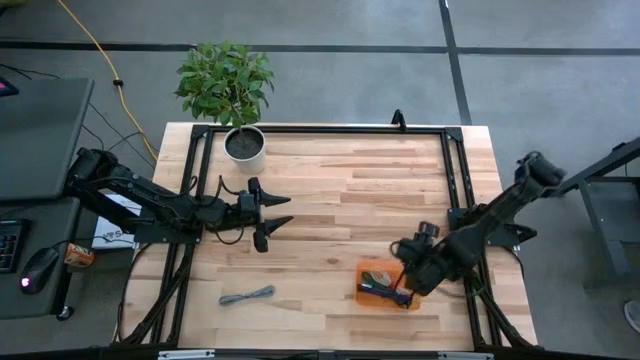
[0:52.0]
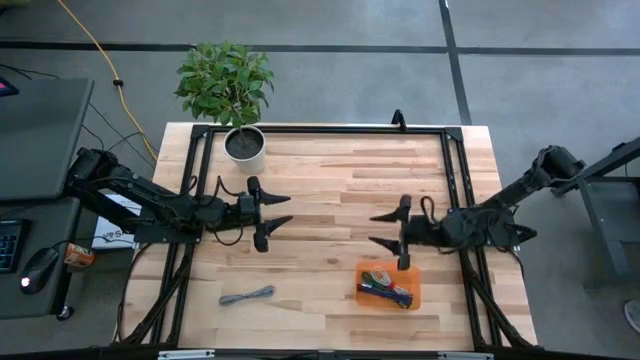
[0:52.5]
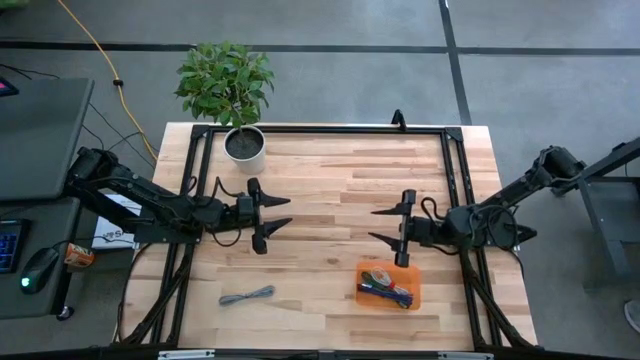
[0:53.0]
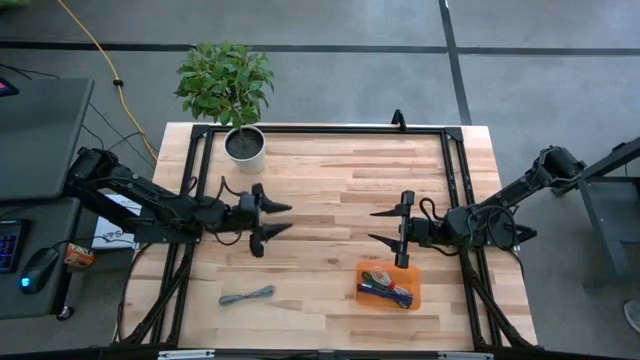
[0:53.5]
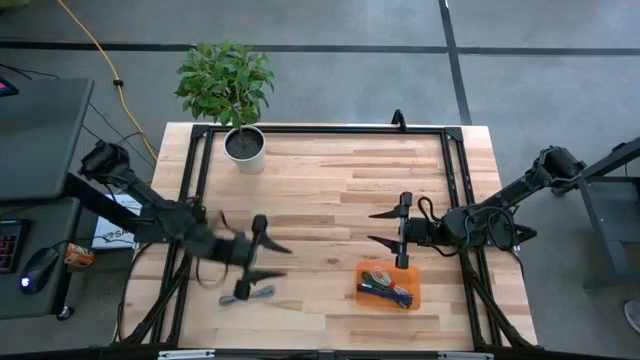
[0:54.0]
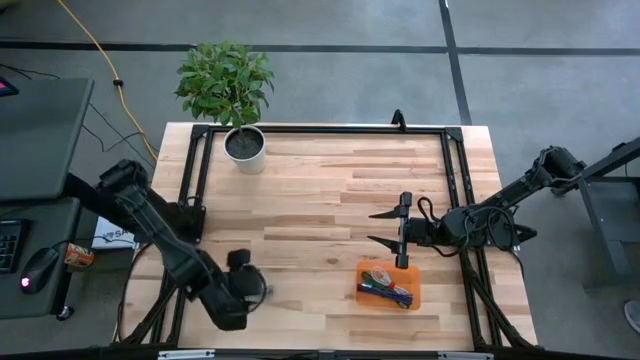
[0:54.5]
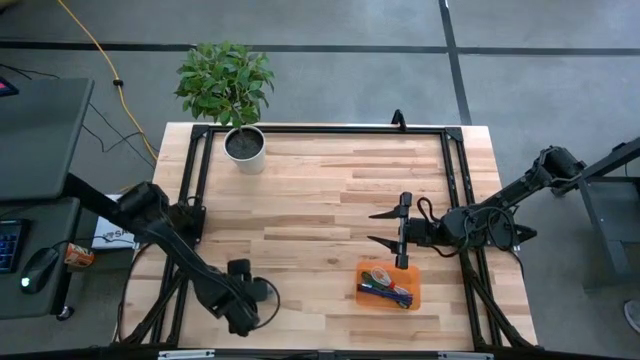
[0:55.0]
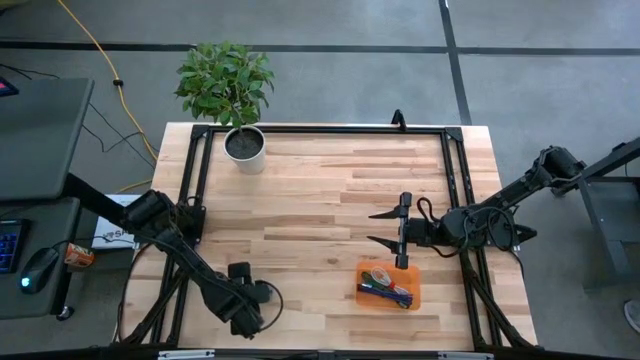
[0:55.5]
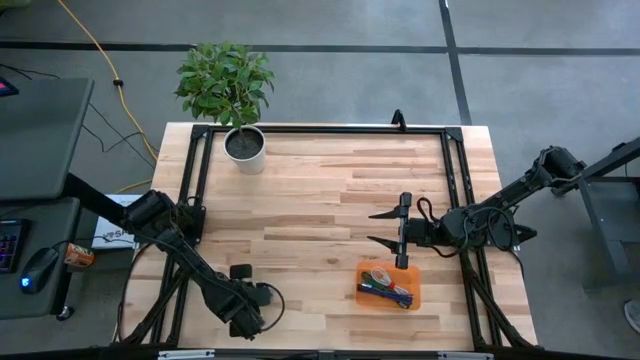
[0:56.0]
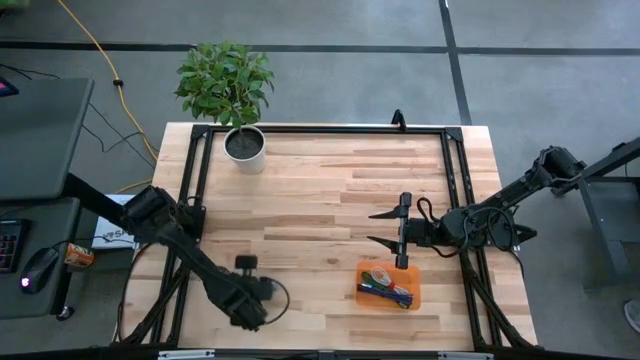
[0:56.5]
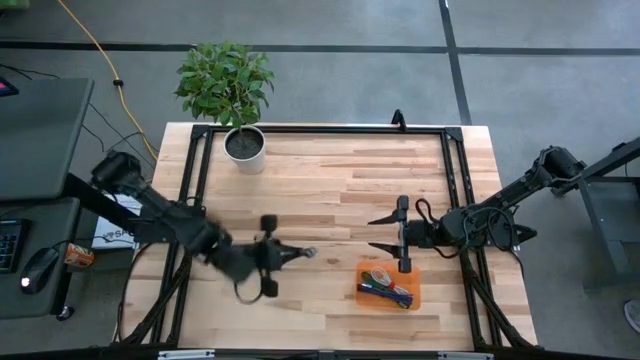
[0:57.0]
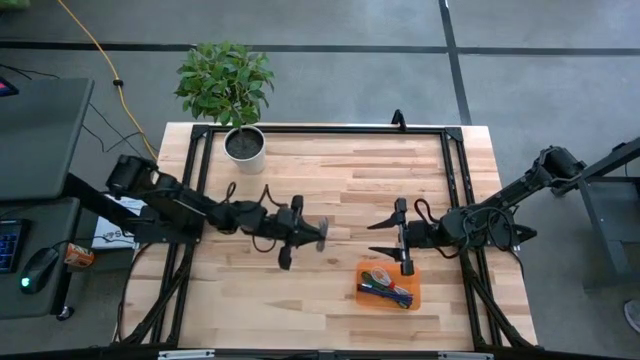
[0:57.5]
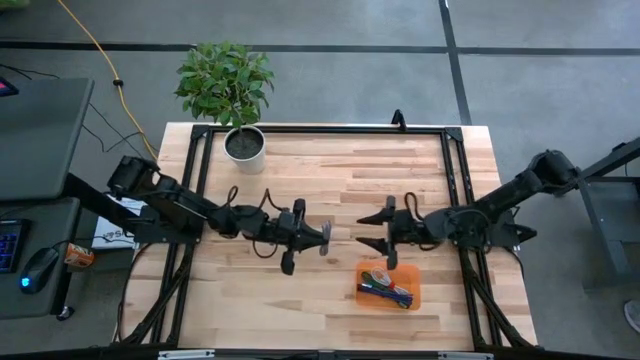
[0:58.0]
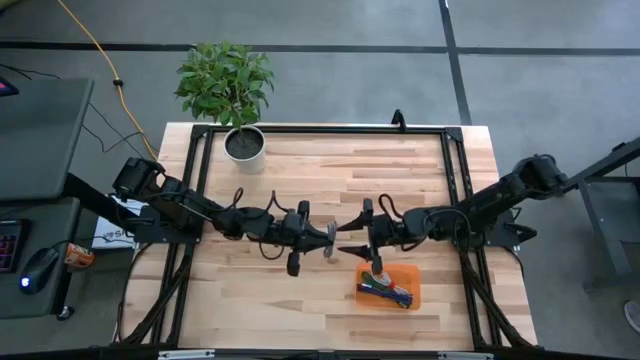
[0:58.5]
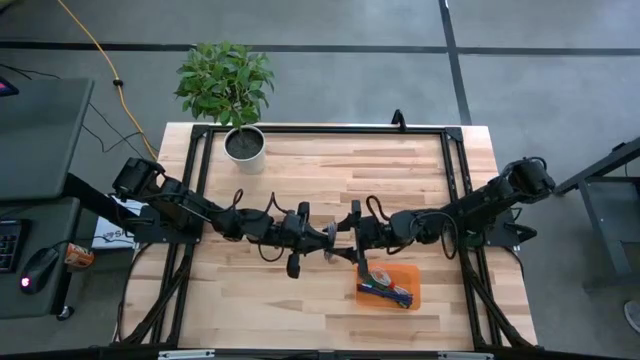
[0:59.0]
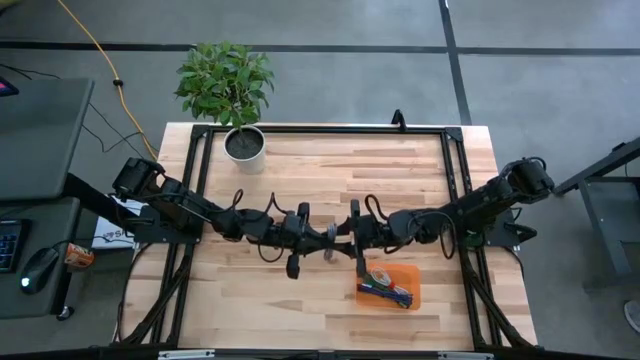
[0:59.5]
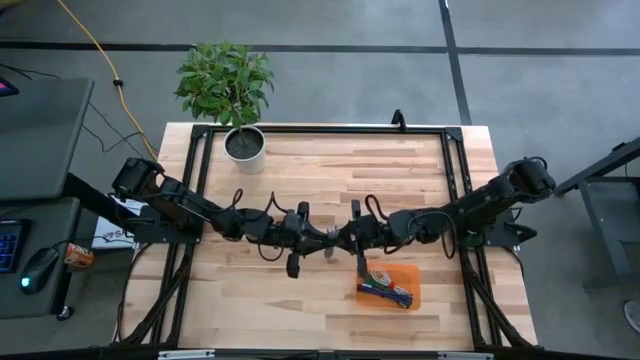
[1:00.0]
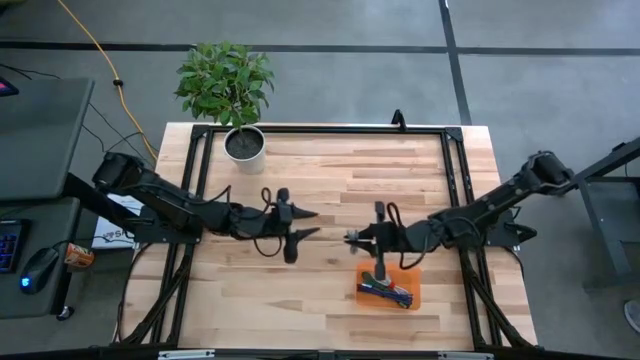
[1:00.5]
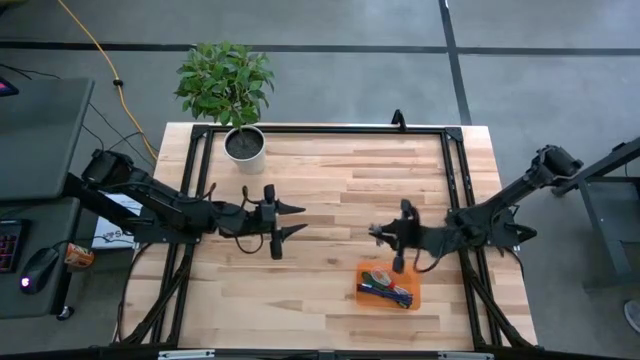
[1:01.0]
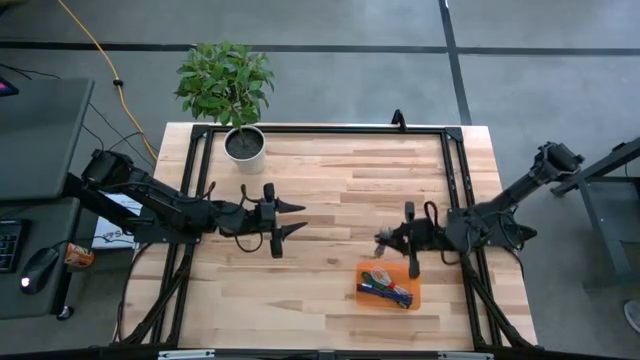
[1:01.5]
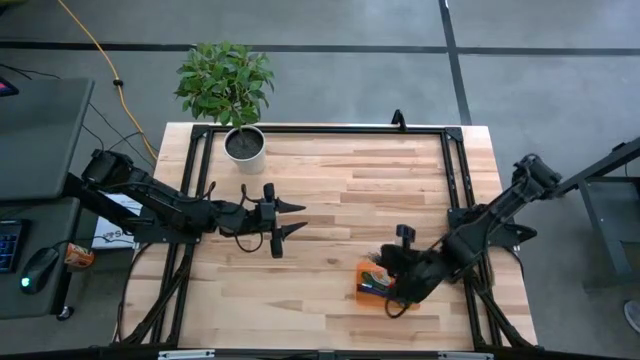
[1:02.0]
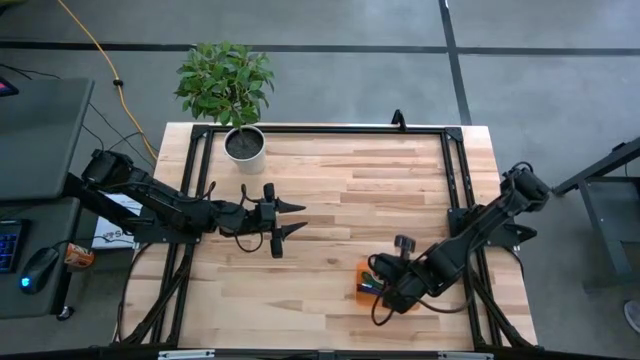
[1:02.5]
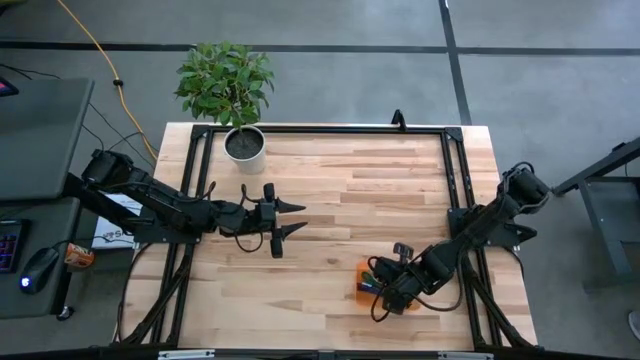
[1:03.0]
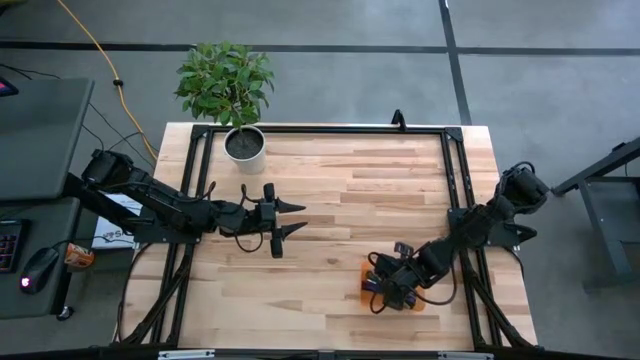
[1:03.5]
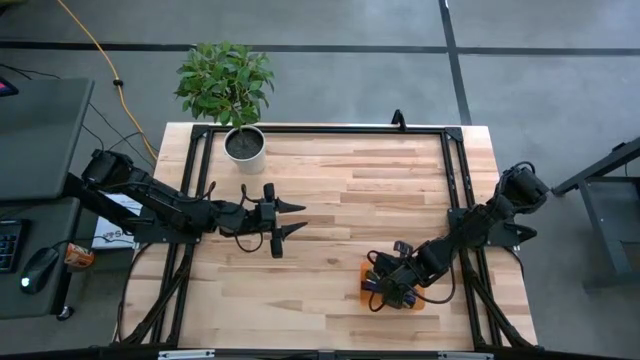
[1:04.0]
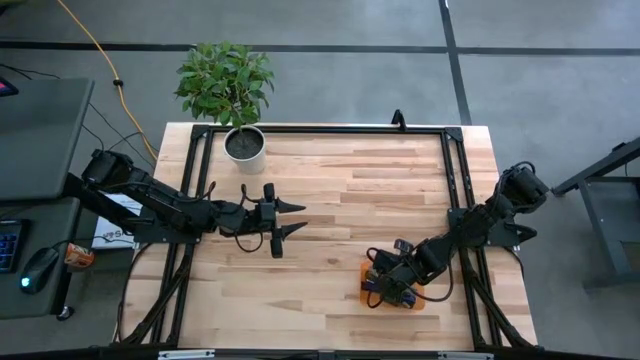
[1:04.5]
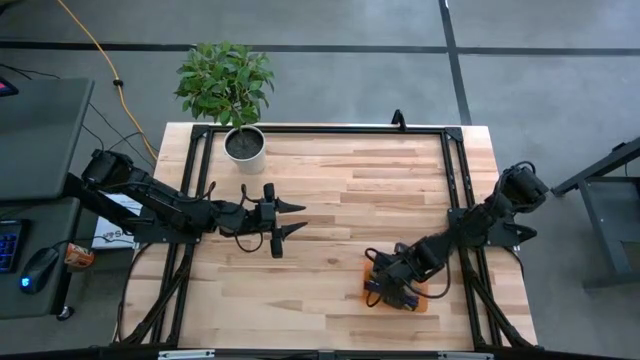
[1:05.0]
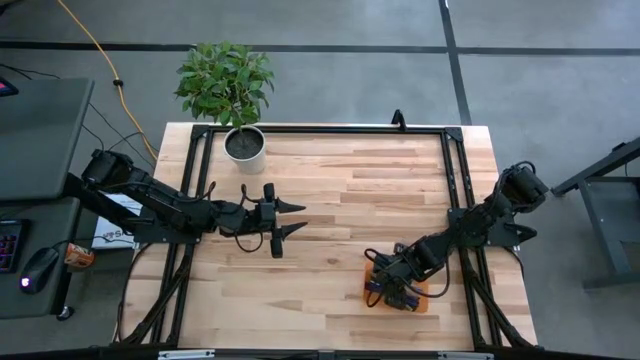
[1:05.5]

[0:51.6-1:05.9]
Task: Pick and place USB-C Cables
Put the gray charger cable into the orange bin

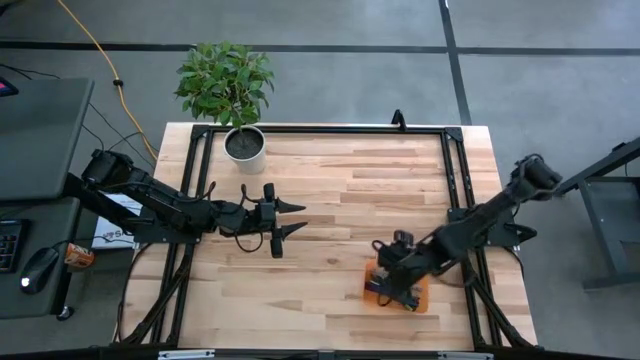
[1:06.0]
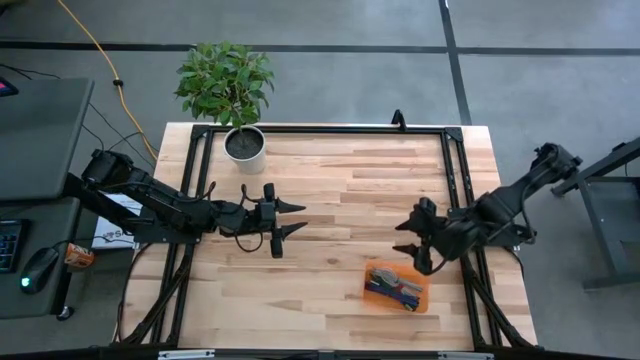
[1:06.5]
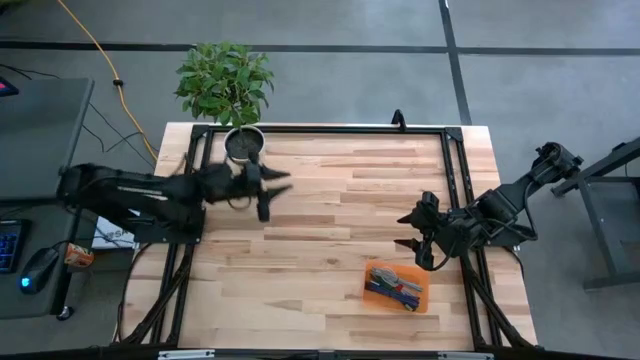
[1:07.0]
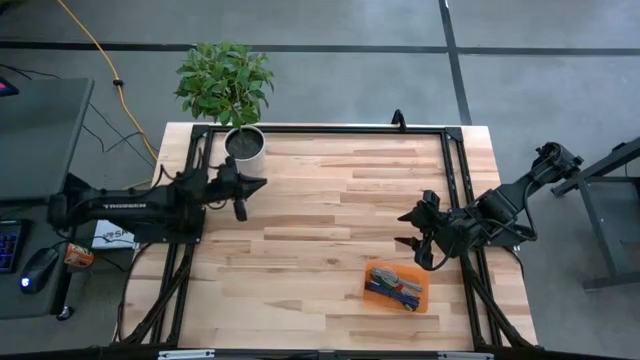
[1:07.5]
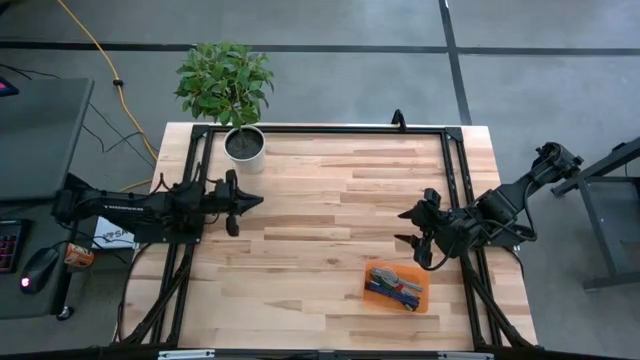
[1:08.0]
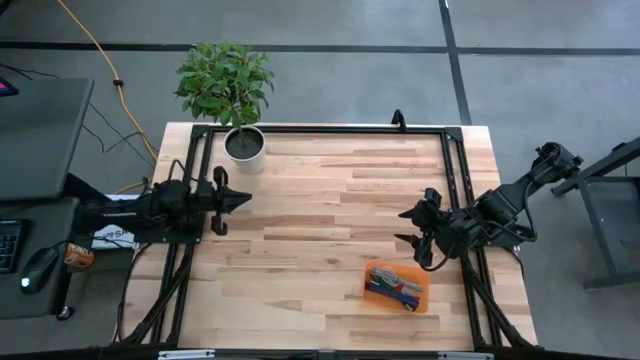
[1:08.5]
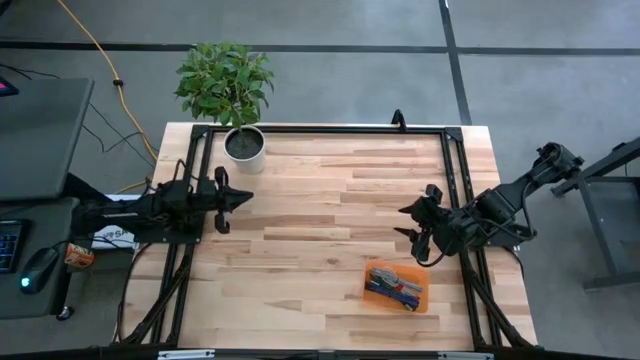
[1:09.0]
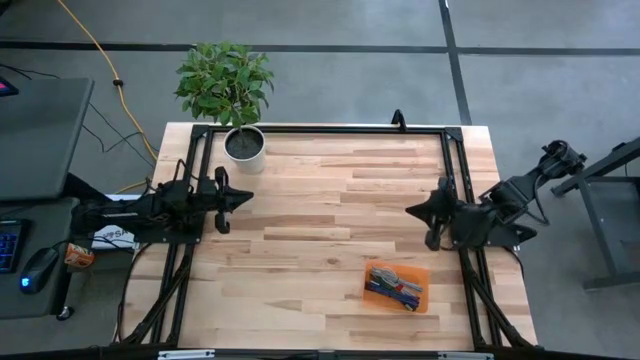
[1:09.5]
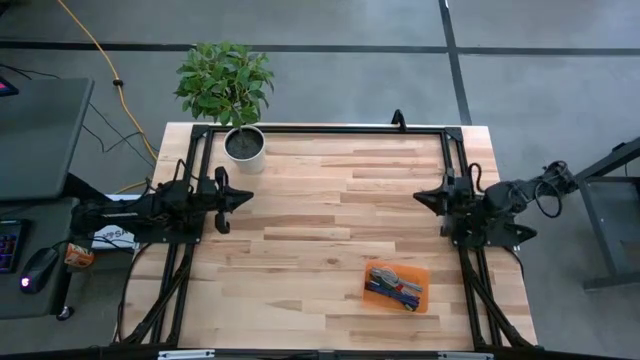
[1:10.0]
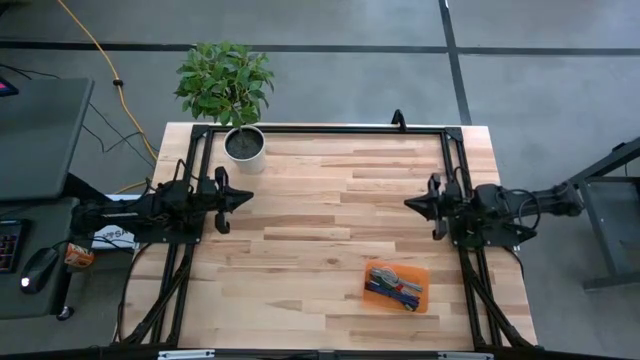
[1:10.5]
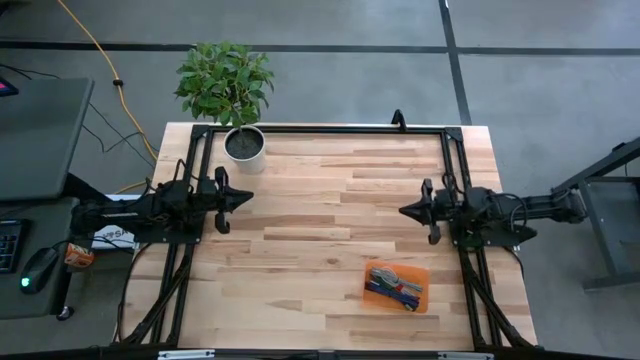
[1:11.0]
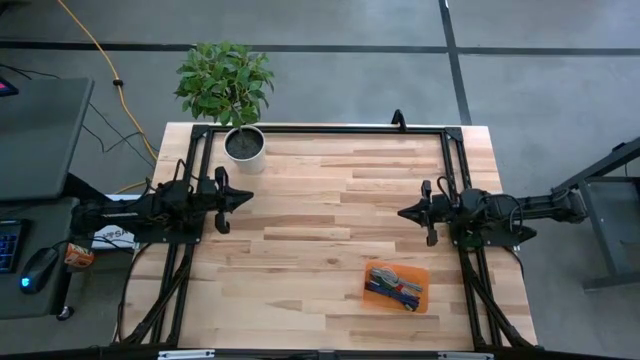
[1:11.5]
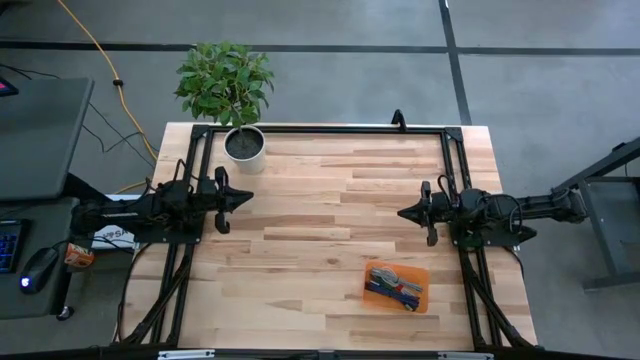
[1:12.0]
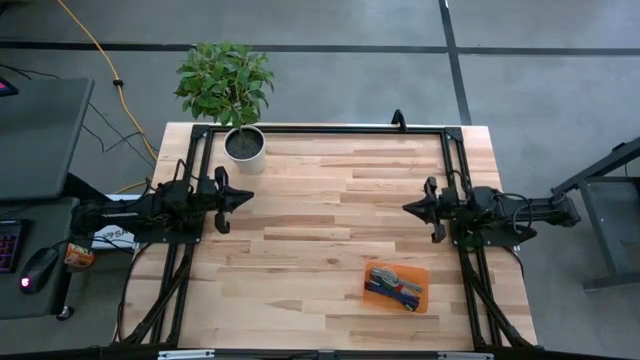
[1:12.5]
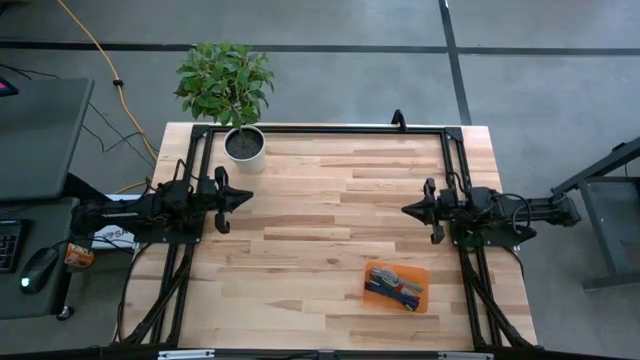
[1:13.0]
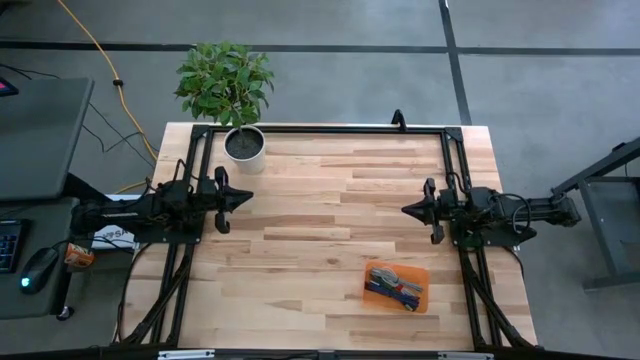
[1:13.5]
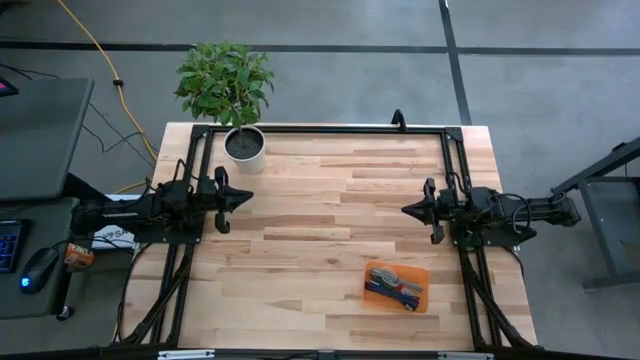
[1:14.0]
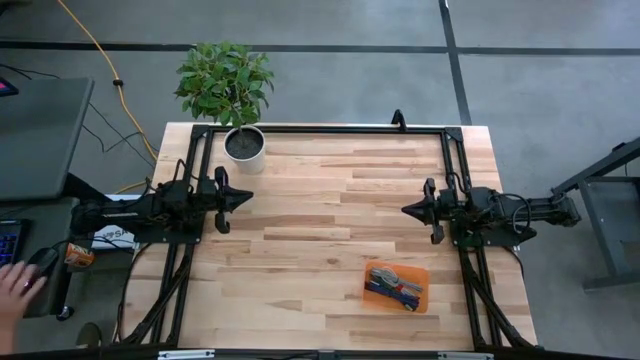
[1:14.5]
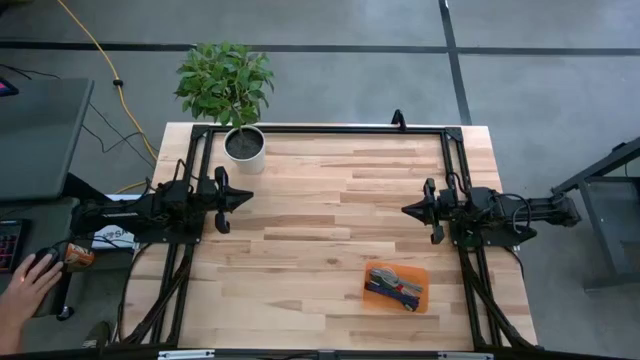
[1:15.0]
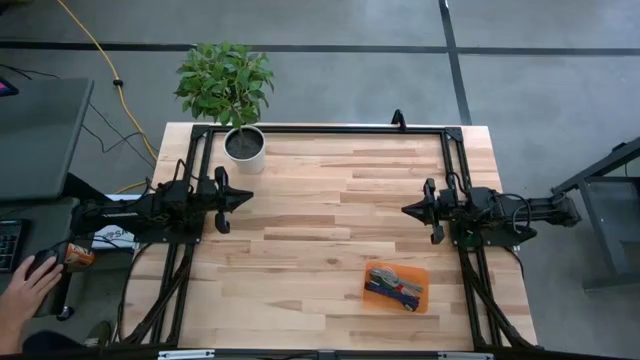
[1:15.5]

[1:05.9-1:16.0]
Return to Home Position
